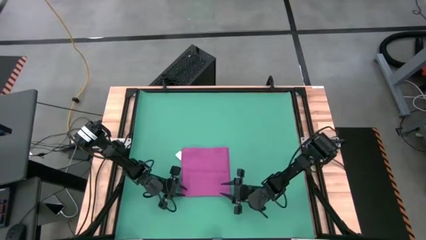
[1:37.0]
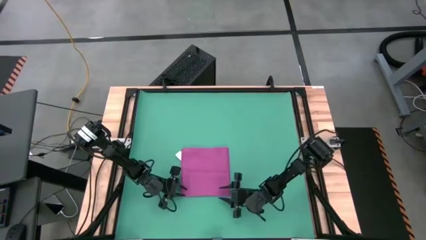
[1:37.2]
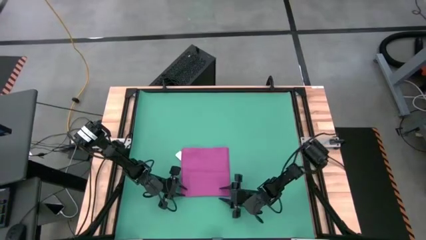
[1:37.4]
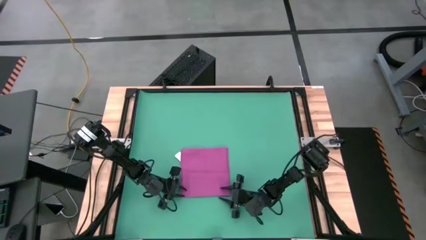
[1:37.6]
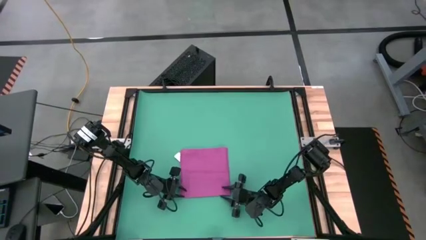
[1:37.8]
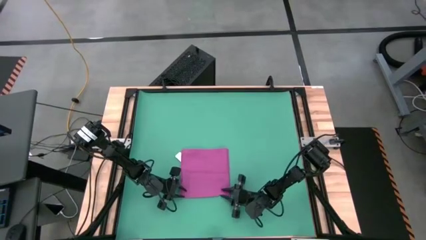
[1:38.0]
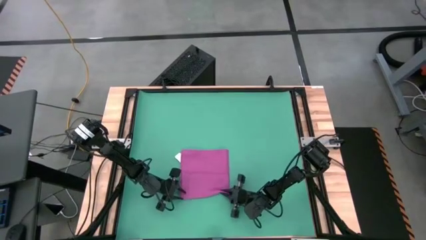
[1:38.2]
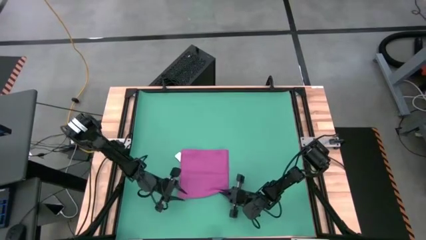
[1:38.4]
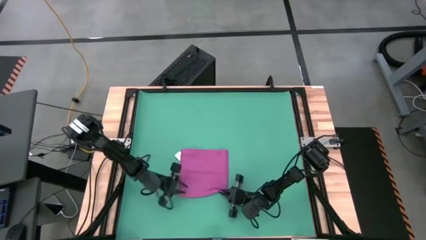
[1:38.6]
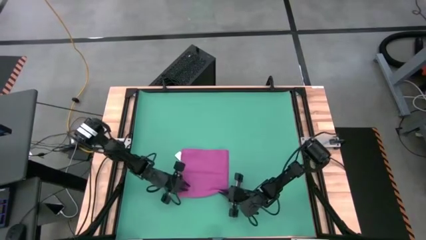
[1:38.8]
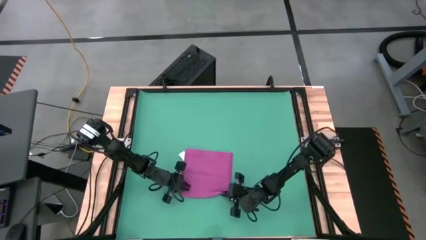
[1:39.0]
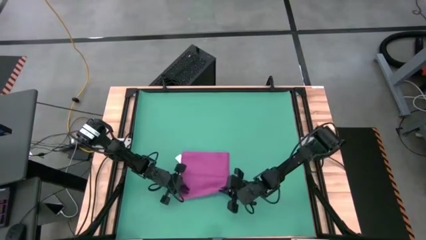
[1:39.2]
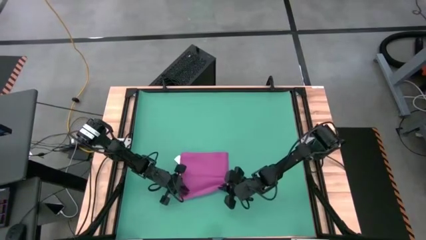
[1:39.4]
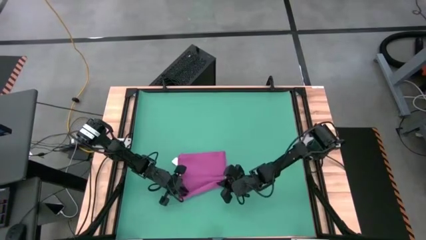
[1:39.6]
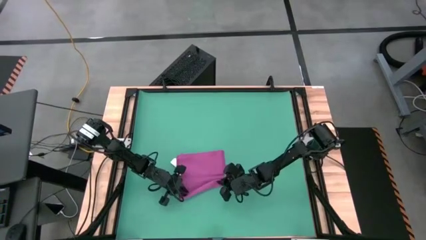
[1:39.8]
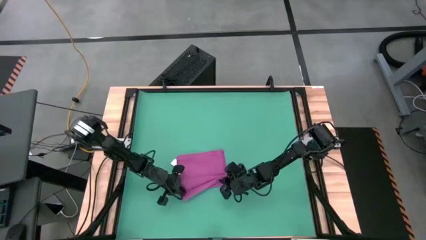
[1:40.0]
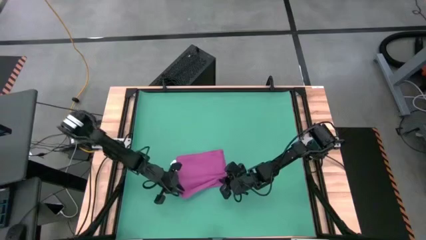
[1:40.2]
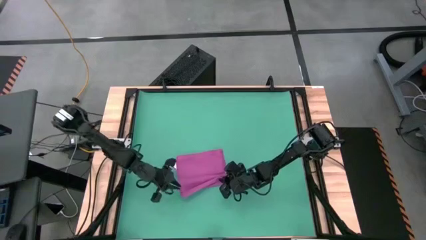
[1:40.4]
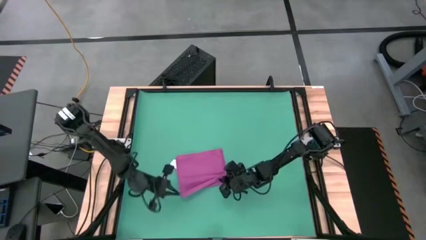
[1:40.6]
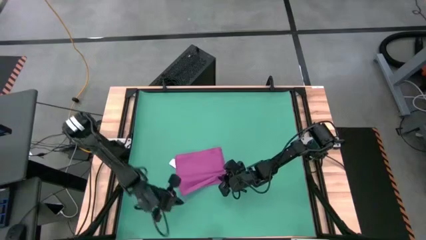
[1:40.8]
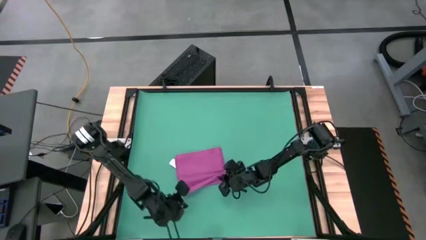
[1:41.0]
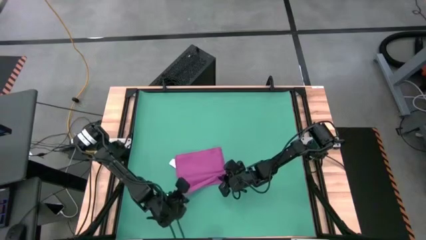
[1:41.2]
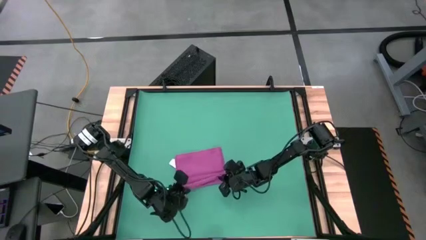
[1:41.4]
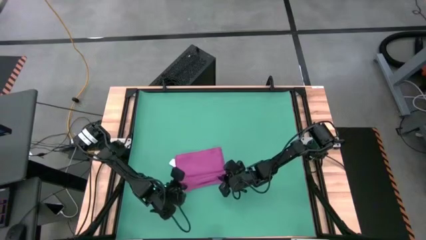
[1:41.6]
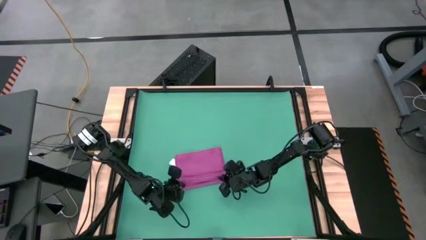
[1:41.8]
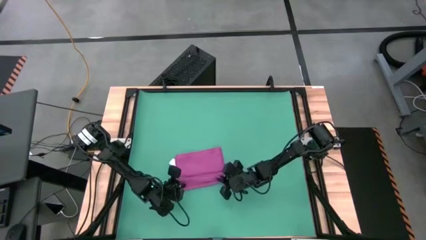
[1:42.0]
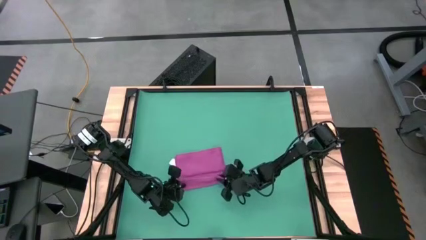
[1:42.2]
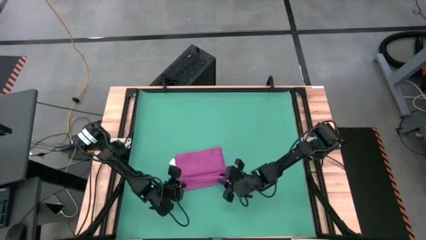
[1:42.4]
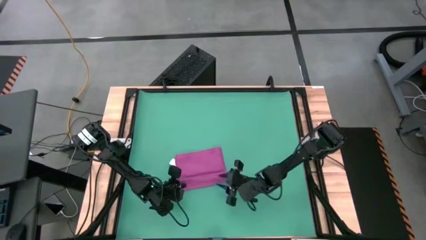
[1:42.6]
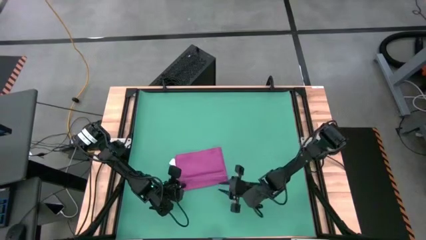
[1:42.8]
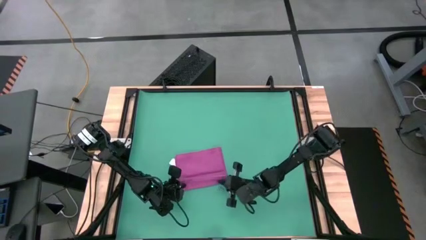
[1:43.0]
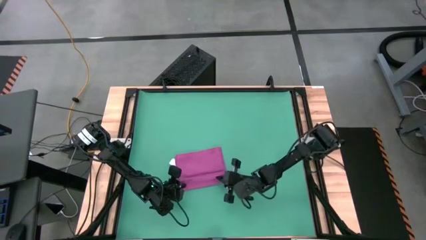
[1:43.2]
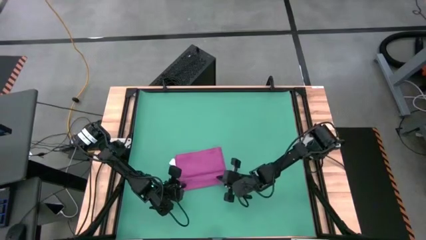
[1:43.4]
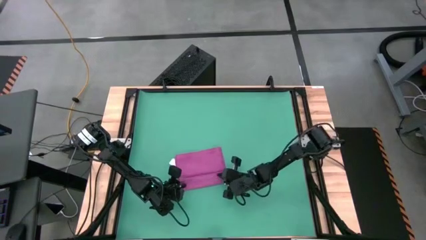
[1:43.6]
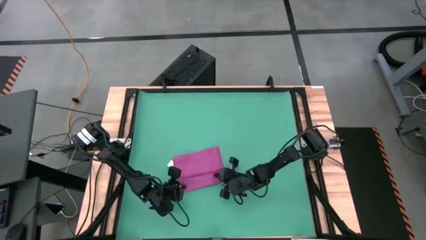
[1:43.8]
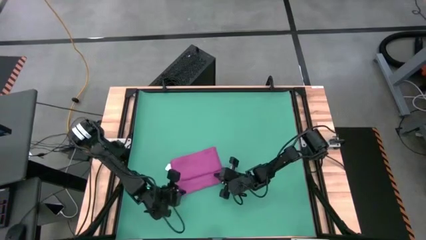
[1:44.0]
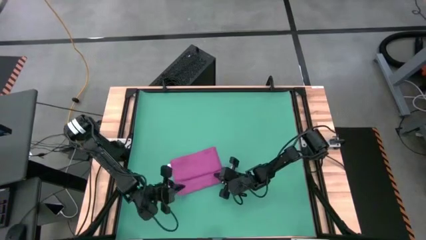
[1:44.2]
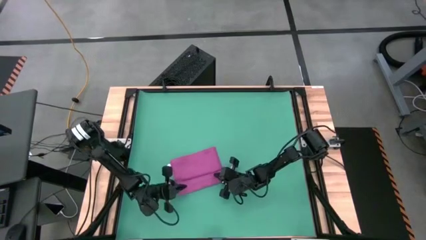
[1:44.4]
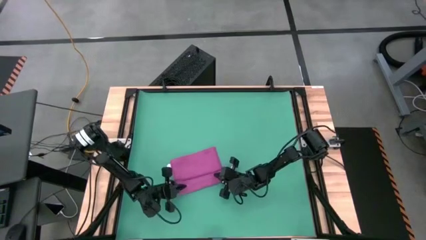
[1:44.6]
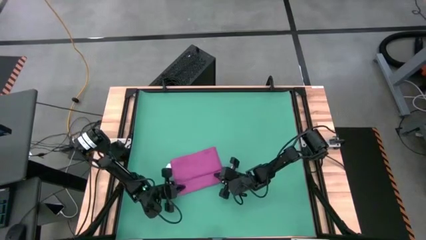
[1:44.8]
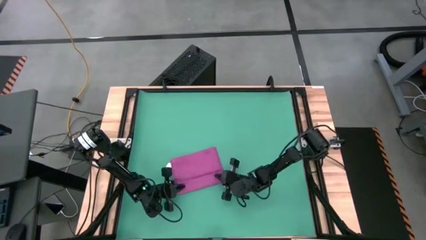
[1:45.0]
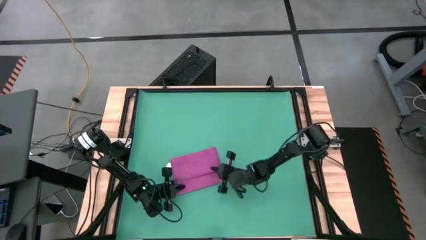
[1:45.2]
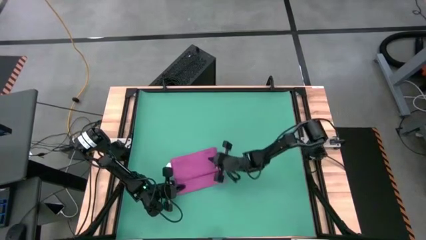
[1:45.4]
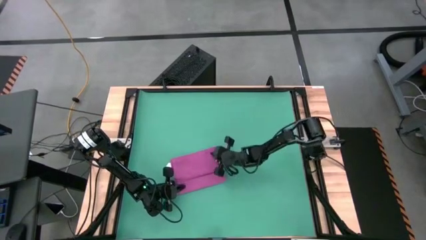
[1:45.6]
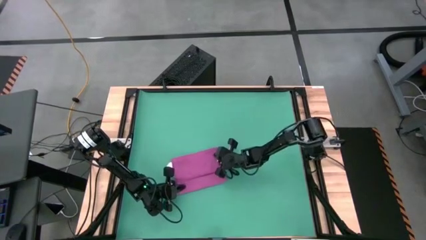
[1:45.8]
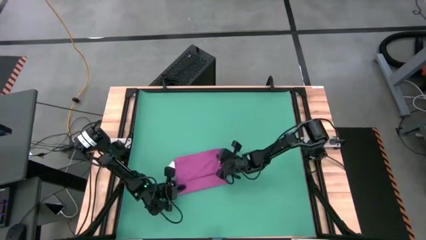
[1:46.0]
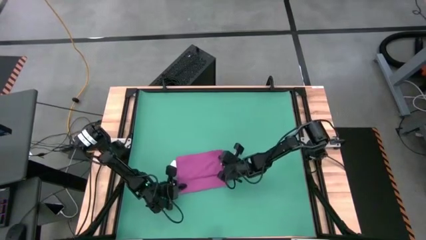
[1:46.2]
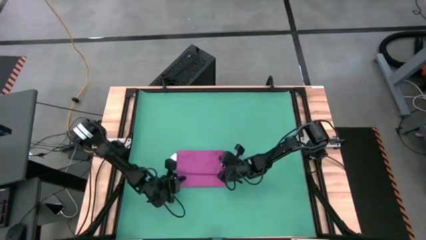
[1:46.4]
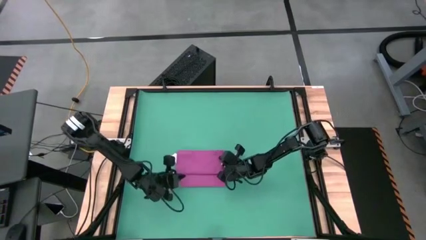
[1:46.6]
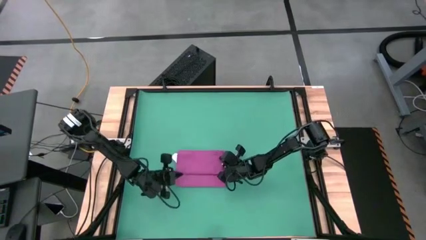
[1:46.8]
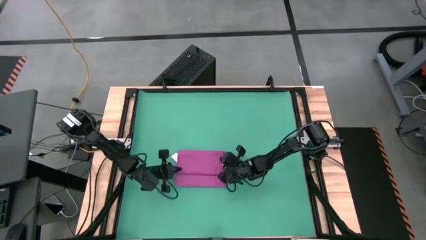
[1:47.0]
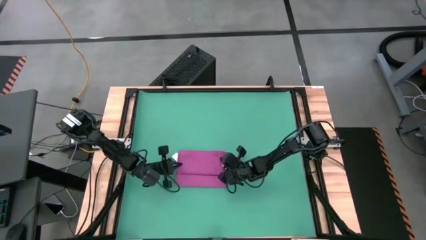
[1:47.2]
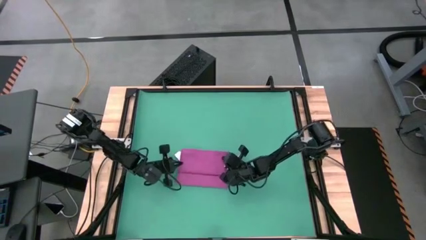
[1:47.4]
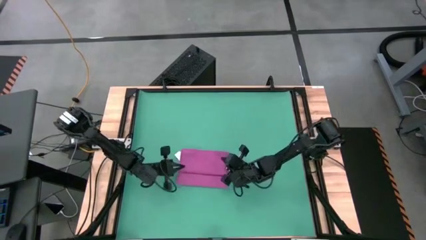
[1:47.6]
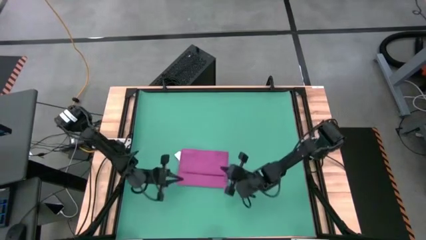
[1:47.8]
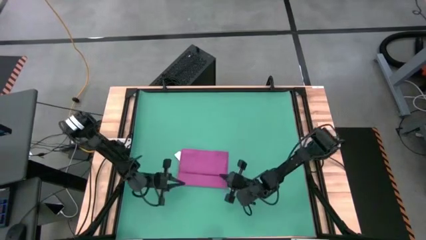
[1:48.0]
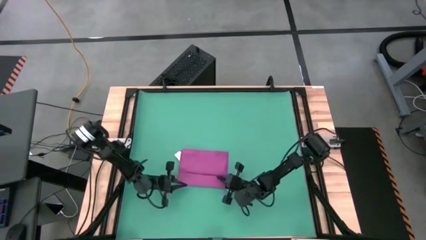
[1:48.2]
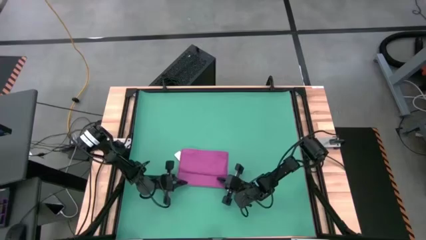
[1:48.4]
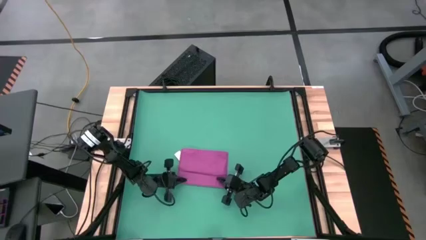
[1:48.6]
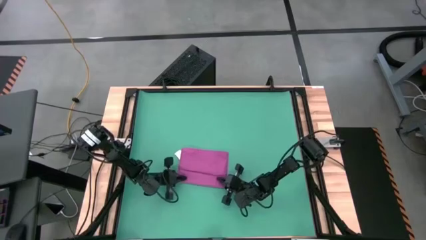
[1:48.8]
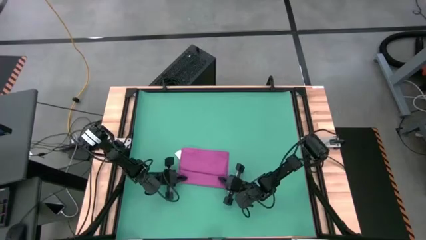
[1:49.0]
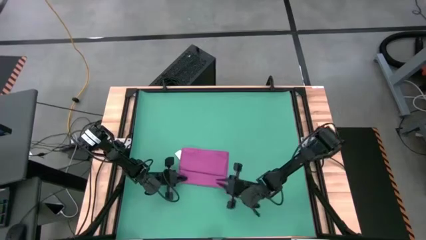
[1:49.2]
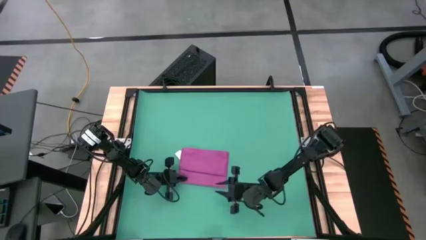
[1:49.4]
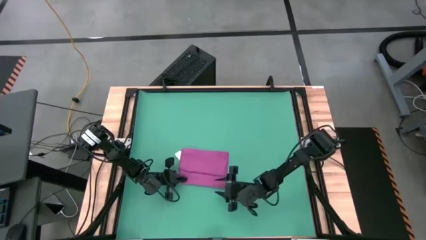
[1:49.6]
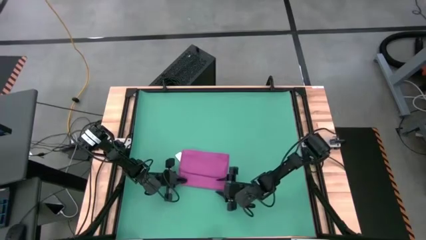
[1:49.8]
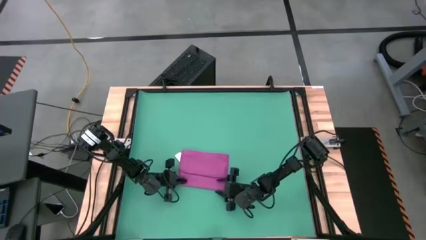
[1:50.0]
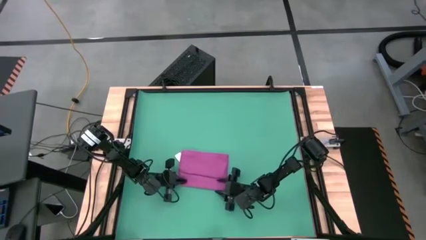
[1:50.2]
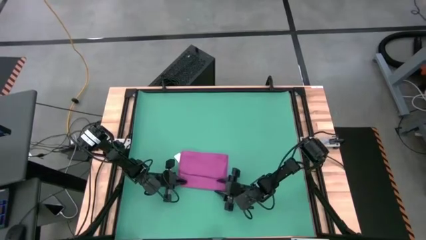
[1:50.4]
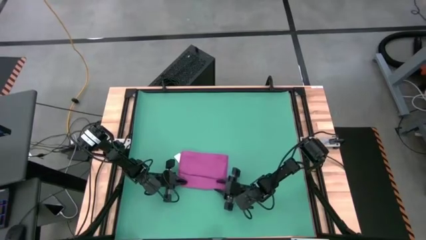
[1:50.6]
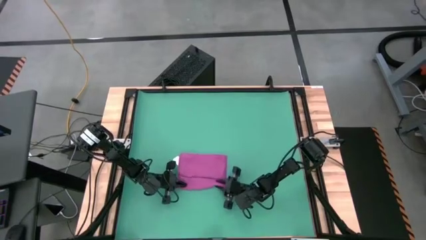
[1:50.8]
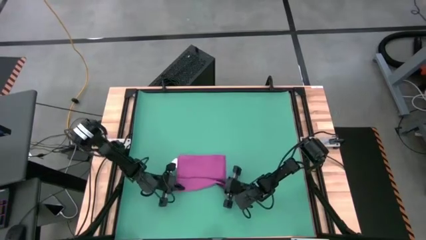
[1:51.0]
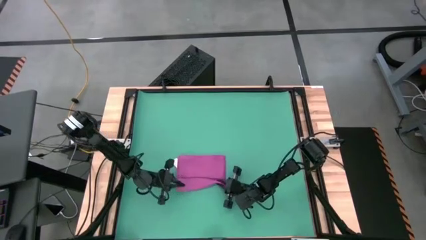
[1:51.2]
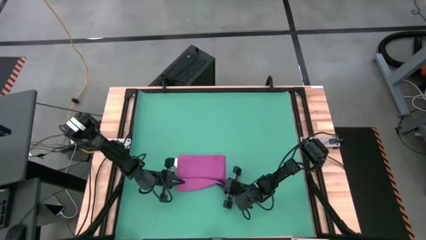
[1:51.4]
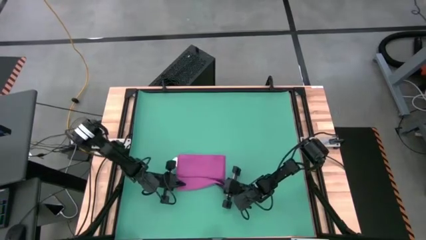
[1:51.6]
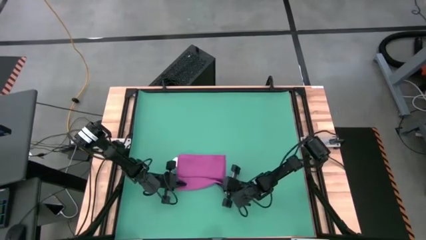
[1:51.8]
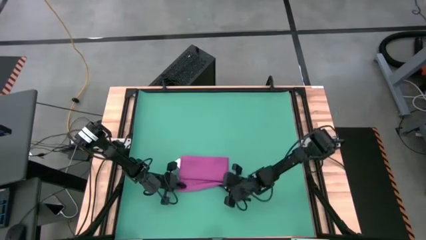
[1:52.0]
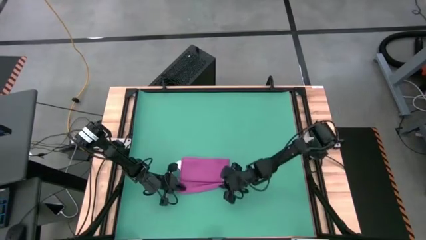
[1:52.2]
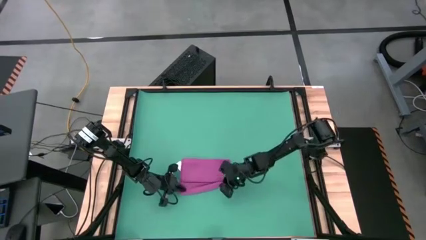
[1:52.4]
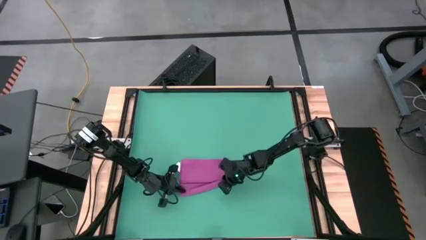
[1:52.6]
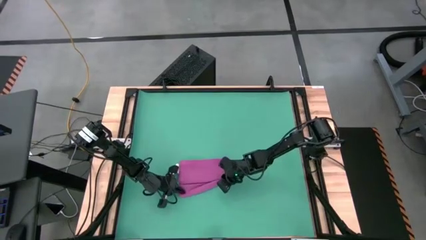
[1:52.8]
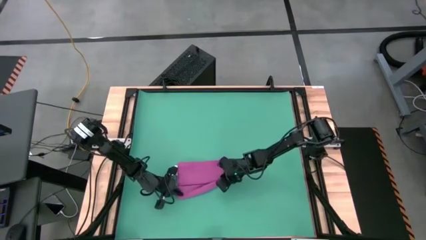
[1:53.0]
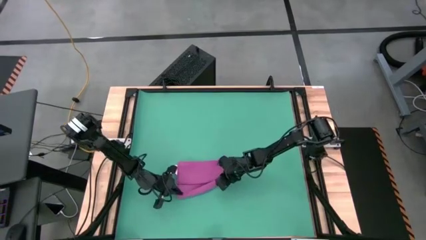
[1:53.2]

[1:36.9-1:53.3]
Task: Roll towel
Roll the pink towel
